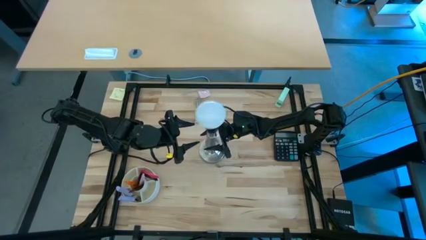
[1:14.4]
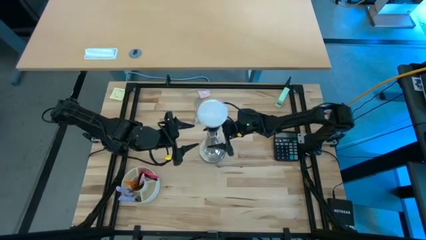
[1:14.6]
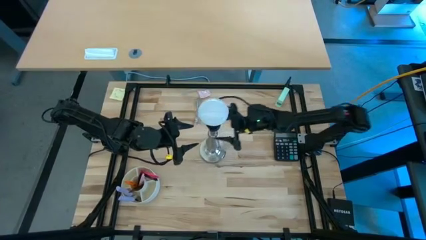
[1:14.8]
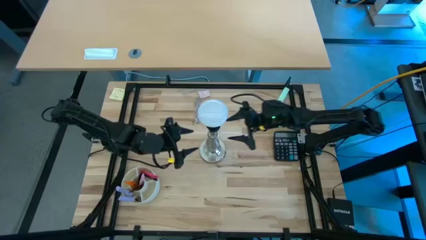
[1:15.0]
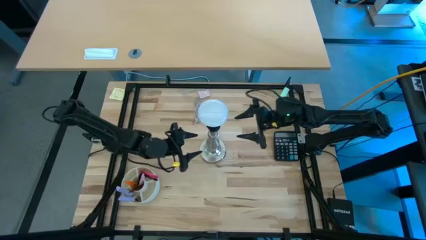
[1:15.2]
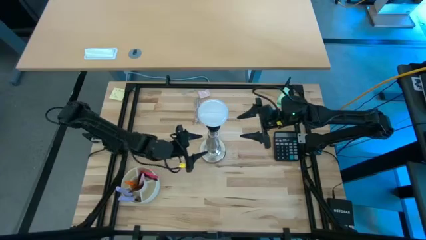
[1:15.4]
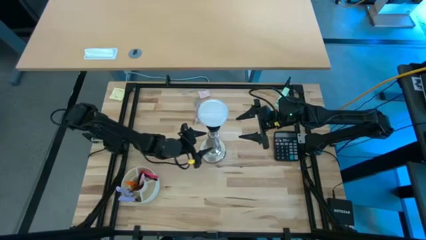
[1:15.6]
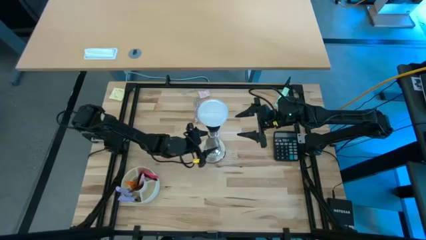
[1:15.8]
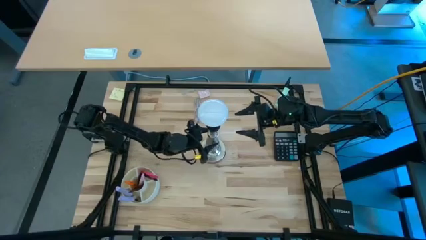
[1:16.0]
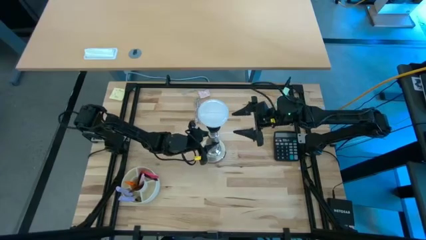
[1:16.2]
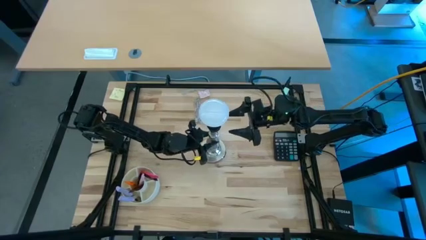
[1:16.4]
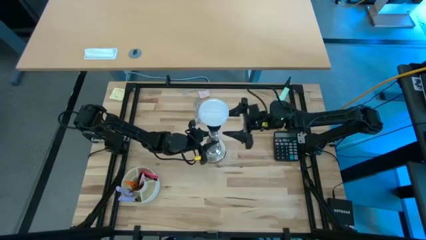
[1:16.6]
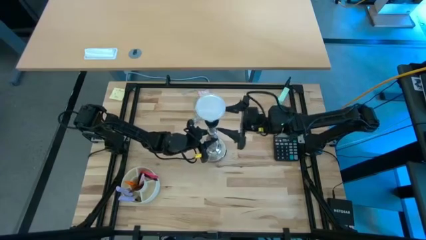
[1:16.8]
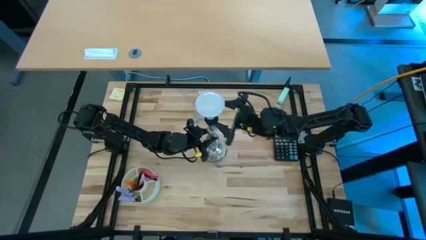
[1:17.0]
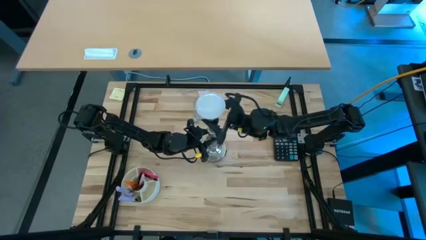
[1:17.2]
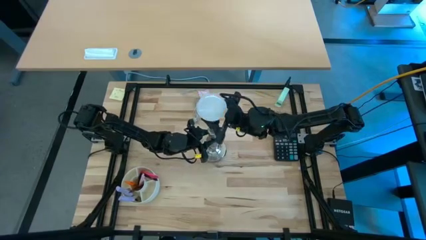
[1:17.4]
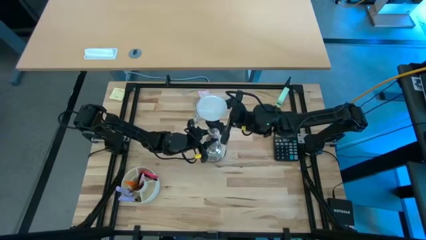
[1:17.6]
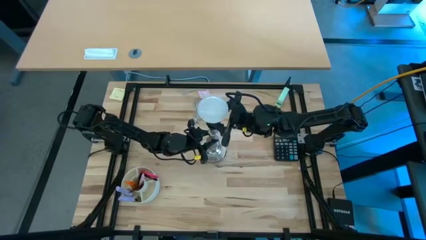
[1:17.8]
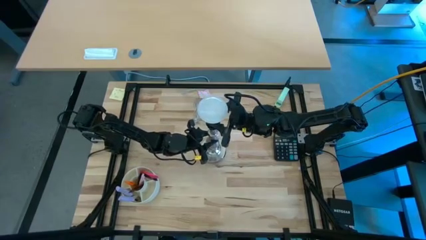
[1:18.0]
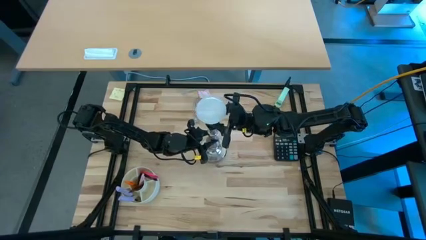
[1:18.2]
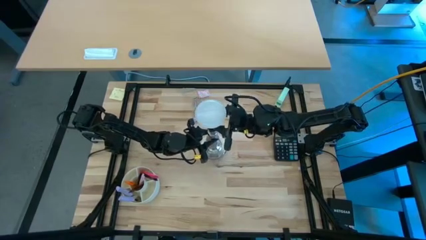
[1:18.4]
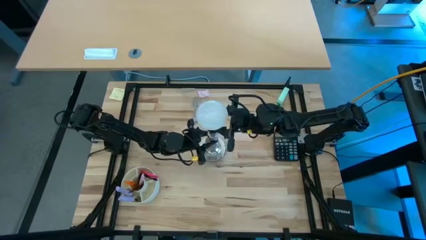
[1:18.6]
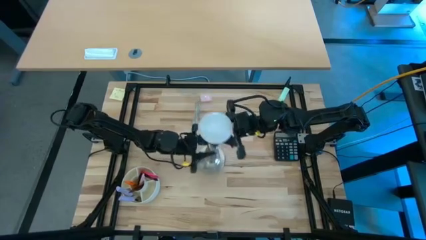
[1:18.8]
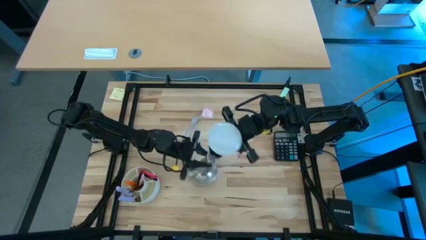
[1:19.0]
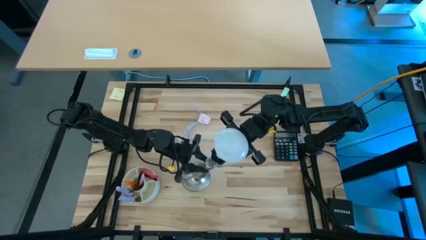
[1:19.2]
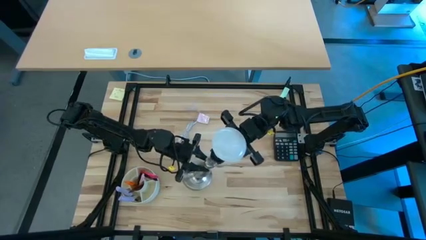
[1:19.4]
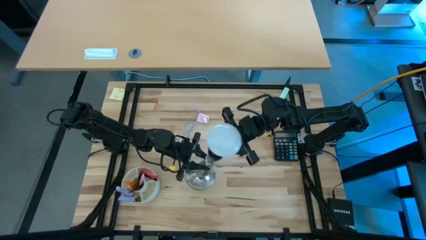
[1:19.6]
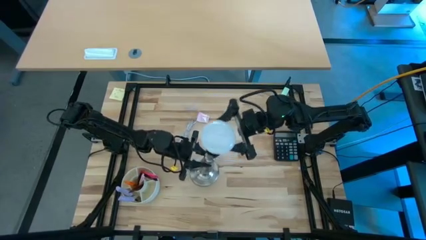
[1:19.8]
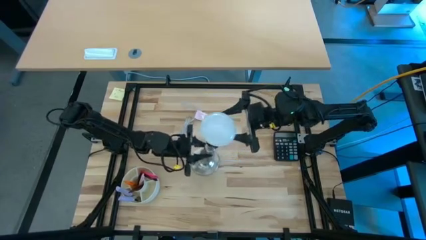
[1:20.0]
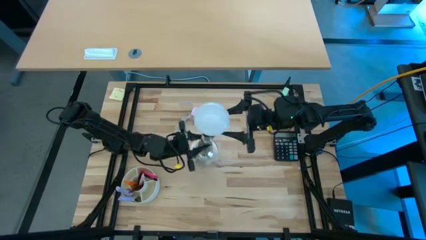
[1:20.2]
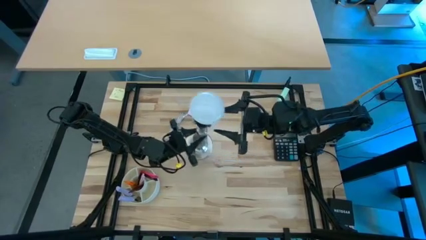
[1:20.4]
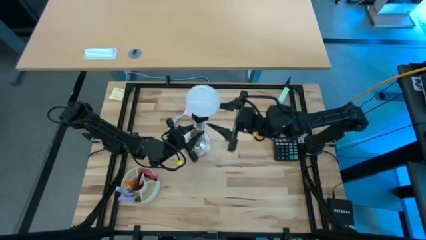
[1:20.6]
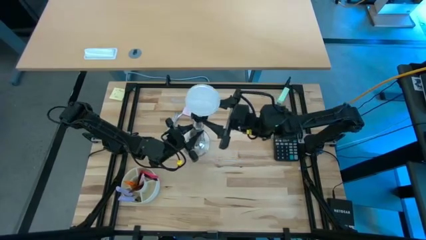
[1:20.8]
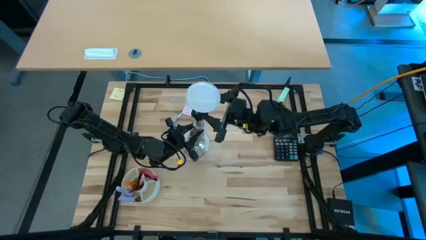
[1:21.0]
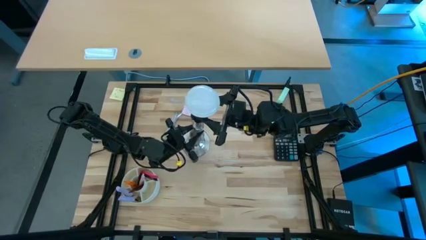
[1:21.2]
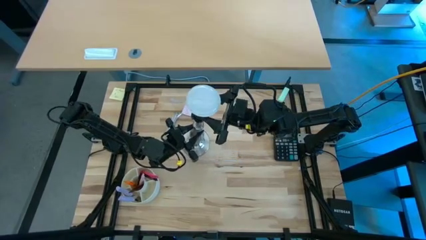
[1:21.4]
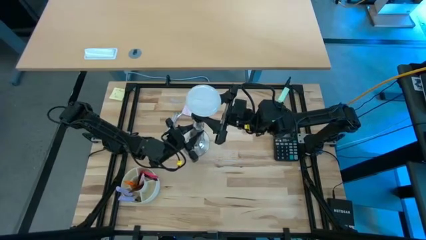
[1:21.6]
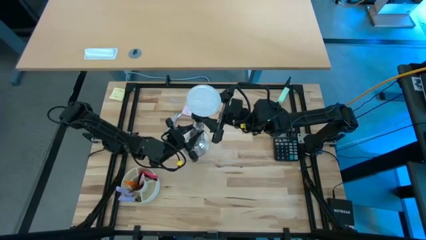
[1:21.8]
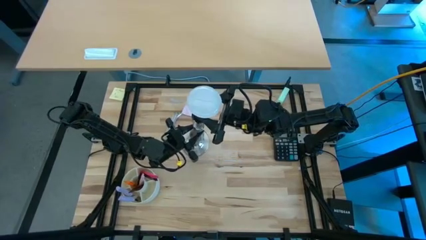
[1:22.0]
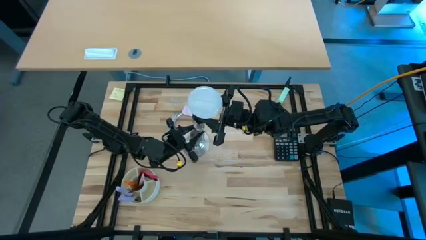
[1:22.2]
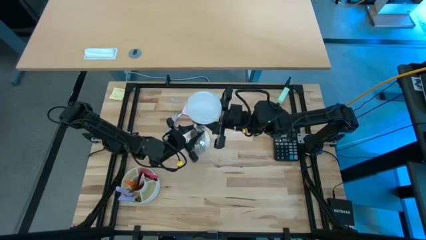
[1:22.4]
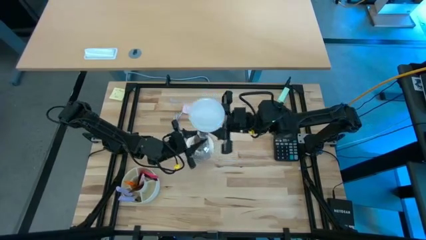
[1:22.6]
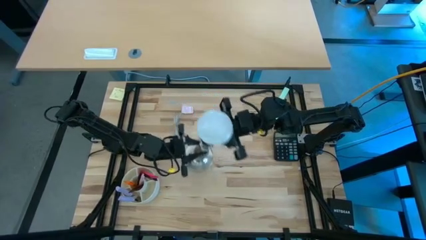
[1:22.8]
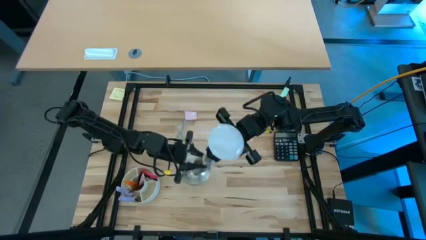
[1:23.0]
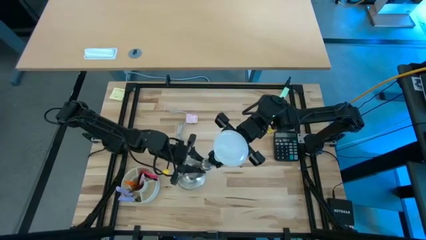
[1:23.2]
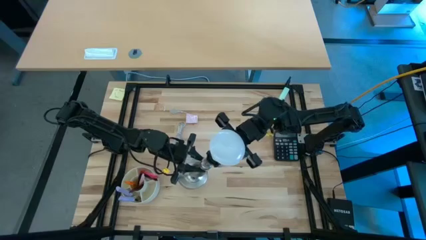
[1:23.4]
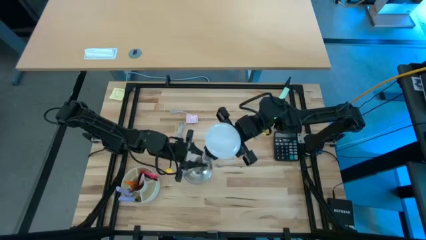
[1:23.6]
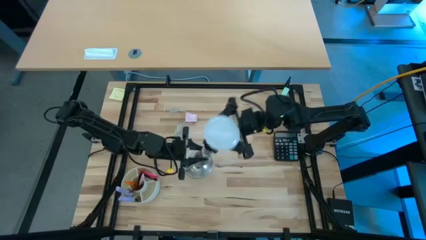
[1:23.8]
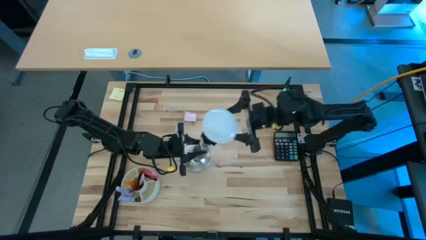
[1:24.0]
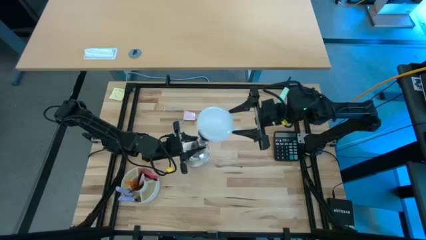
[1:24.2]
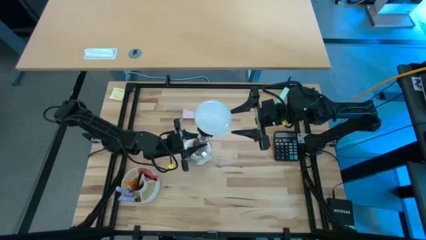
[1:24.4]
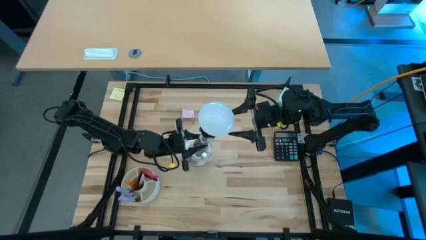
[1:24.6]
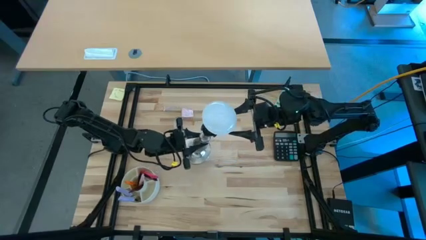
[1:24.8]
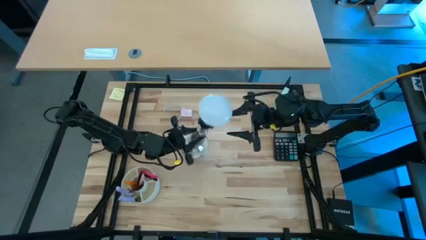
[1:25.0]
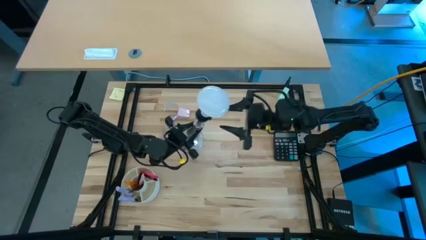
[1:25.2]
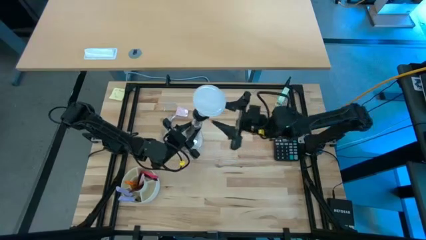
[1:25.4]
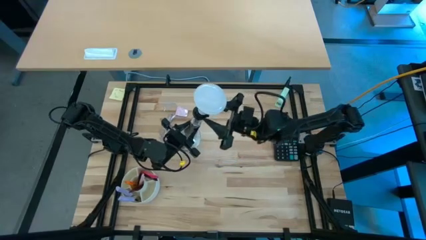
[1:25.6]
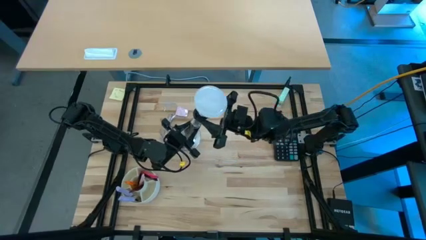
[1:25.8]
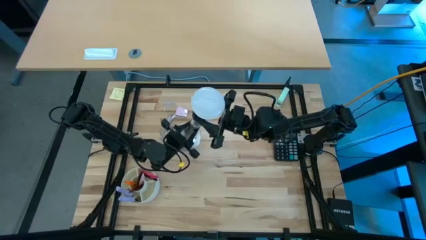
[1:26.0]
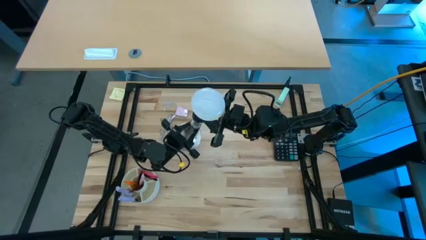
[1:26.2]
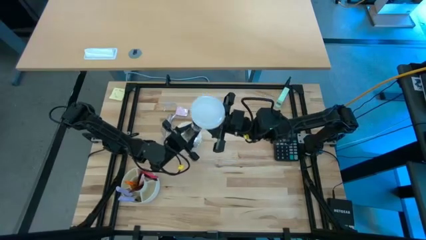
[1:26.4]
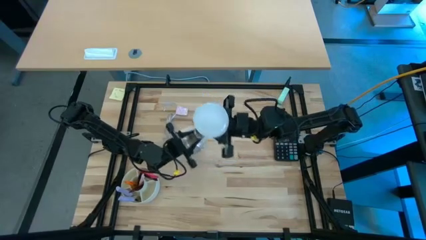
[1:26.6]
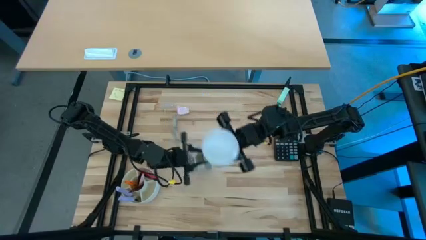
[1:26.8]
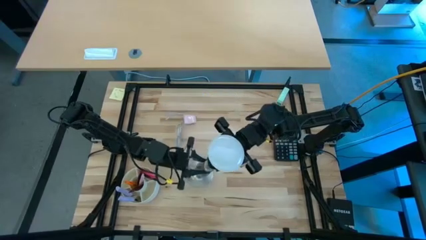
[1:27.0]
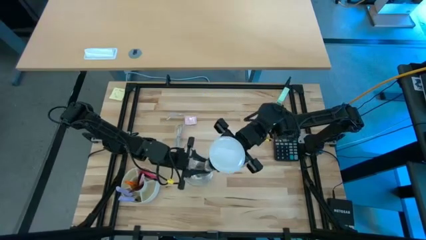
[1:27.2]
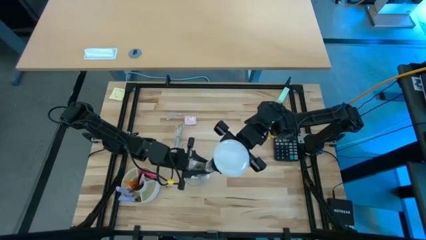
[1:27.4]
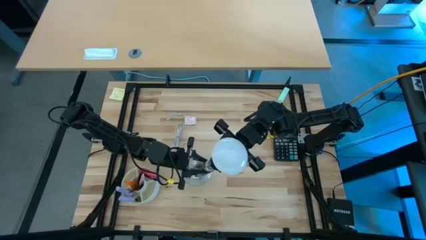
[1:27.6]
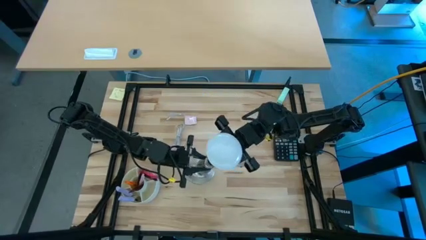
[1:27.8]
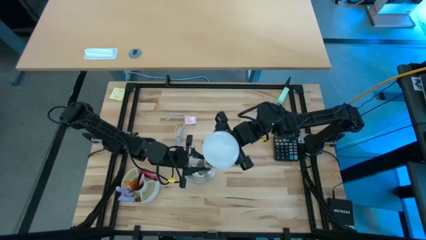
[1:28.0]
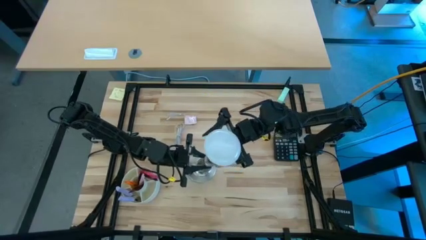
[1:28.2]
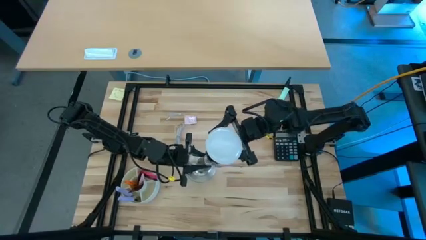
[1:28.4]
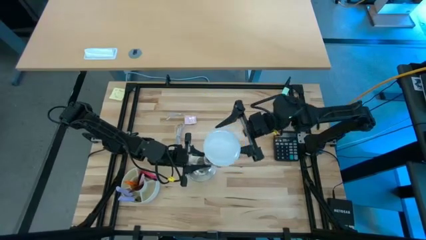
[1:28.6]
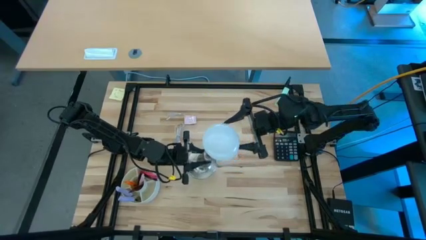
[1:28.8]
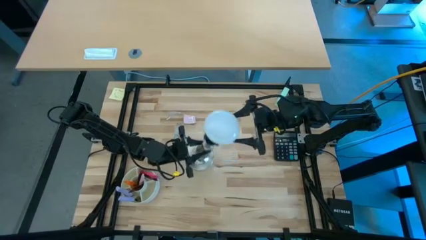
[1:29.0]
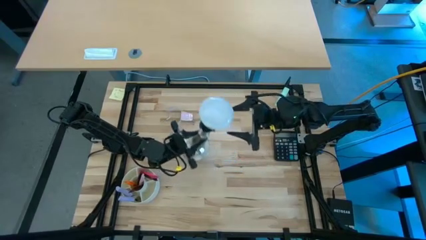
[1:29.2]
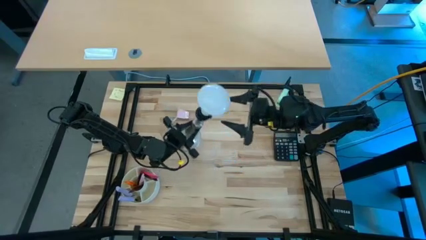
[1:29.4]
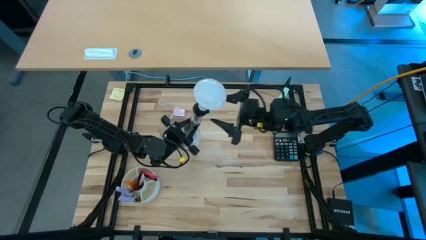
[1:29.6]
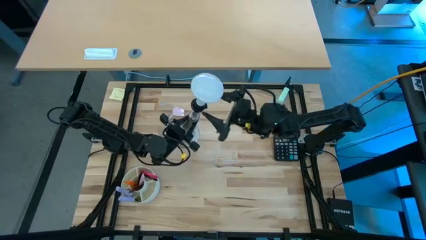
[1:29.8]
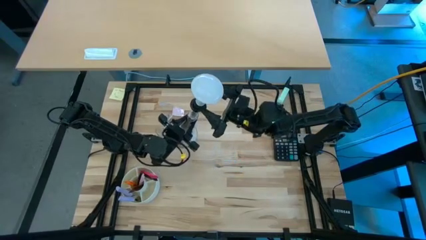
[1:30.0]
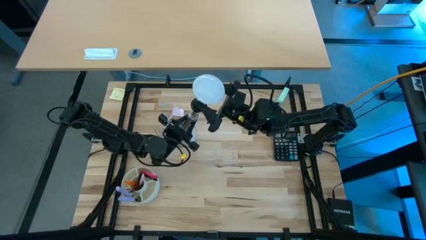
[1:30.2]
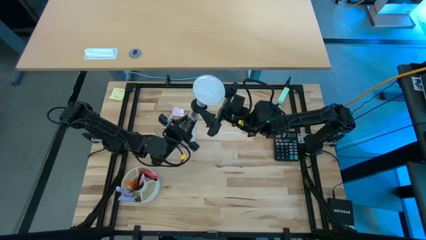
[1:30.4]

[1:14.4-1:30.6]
Task: Screw lightbulb
Remove the white lightbulb from the silver lamp
